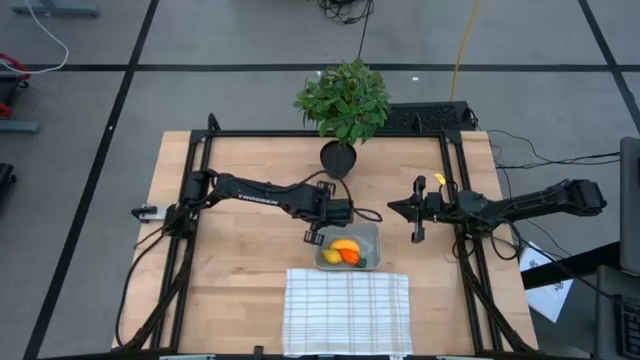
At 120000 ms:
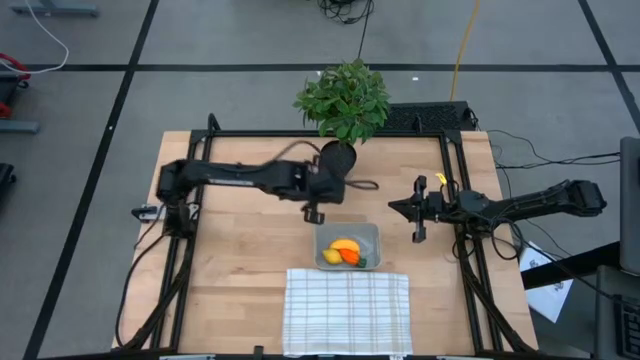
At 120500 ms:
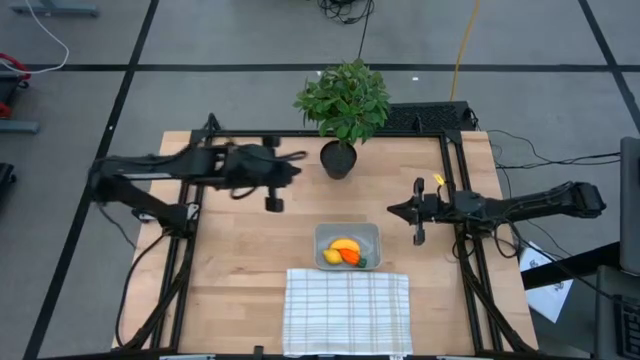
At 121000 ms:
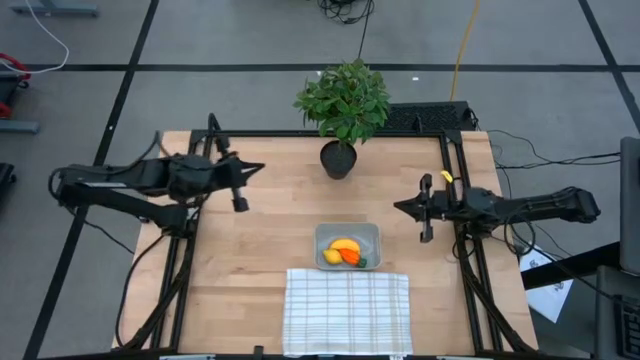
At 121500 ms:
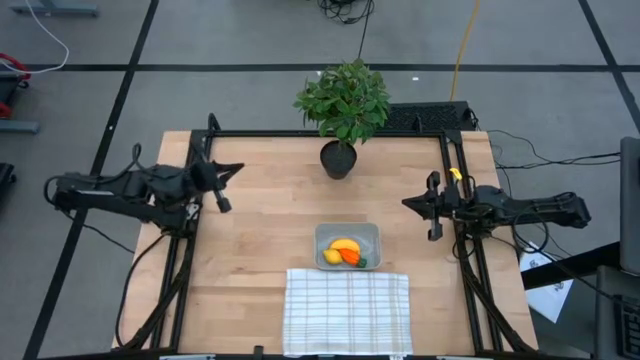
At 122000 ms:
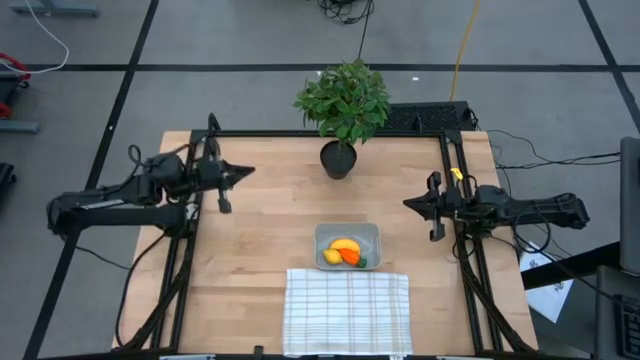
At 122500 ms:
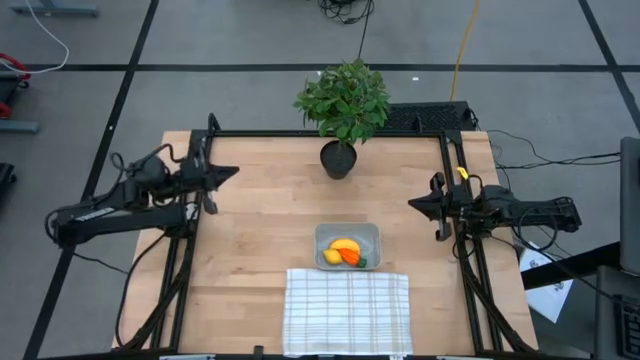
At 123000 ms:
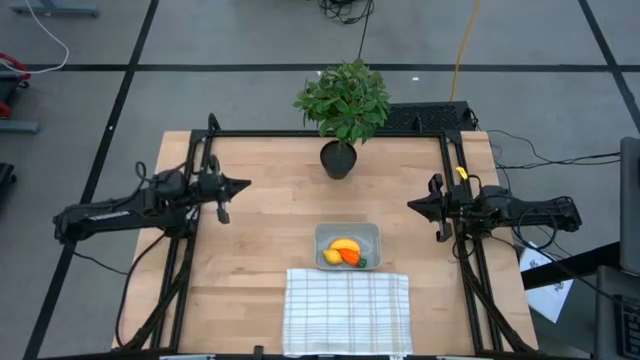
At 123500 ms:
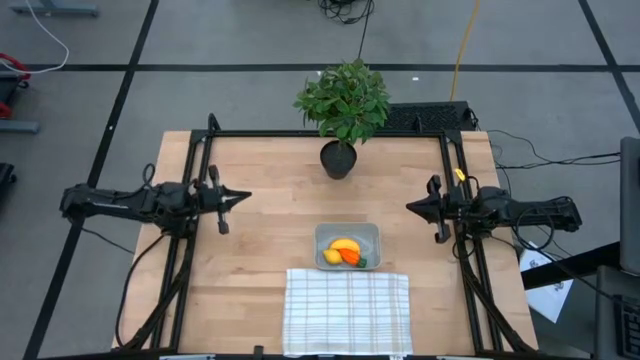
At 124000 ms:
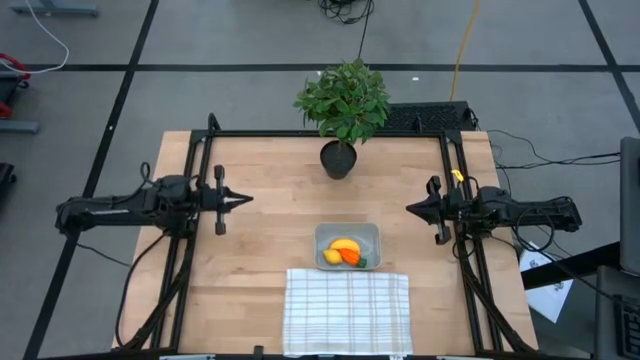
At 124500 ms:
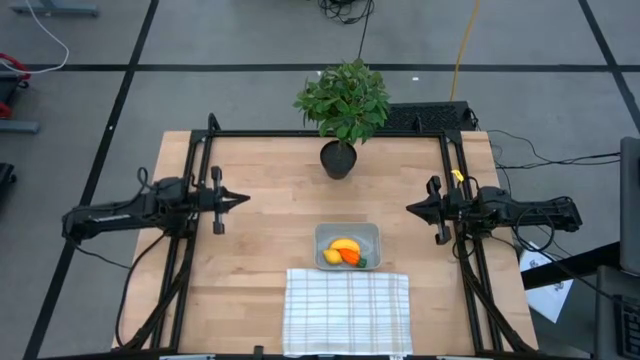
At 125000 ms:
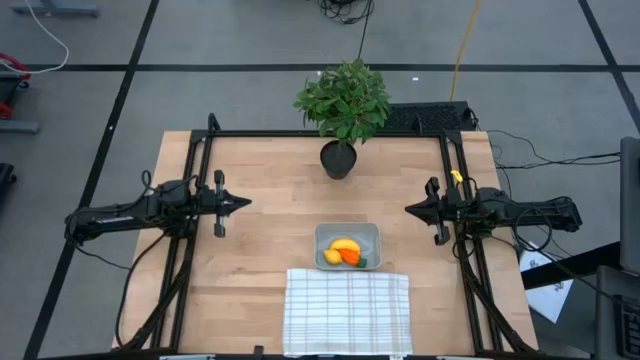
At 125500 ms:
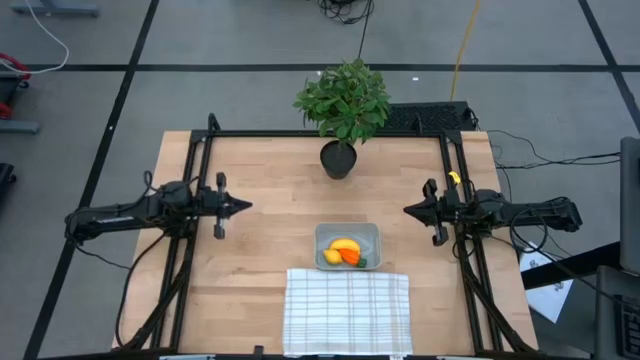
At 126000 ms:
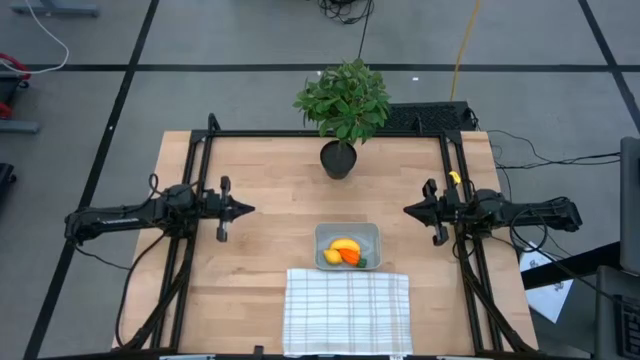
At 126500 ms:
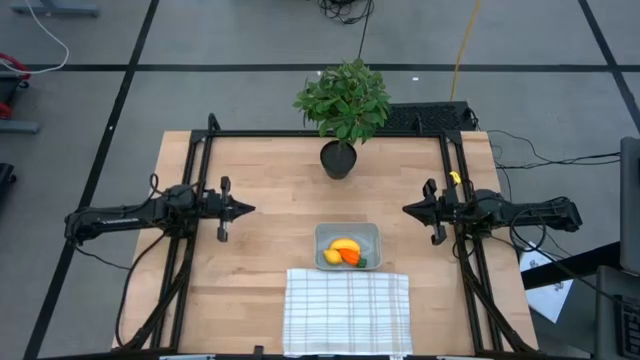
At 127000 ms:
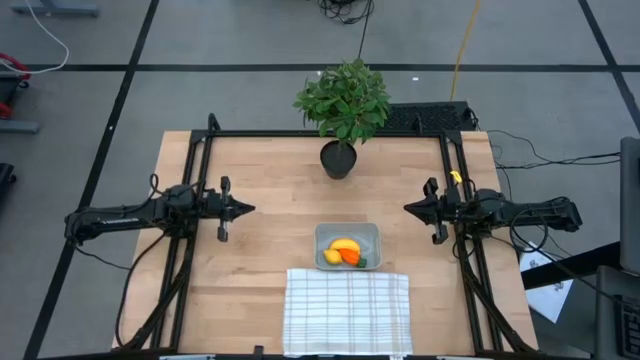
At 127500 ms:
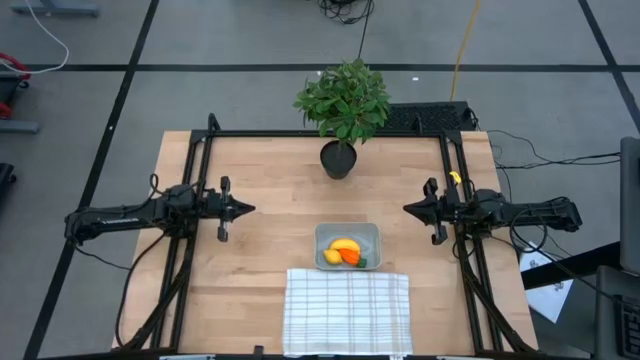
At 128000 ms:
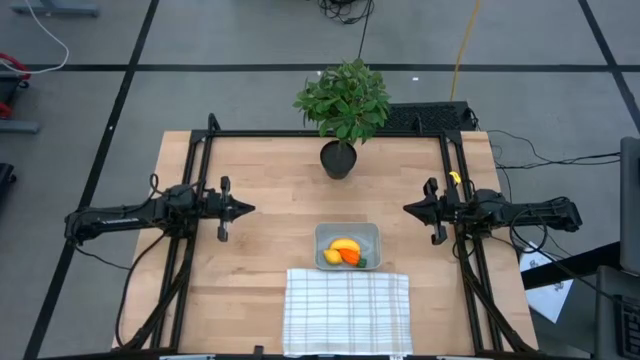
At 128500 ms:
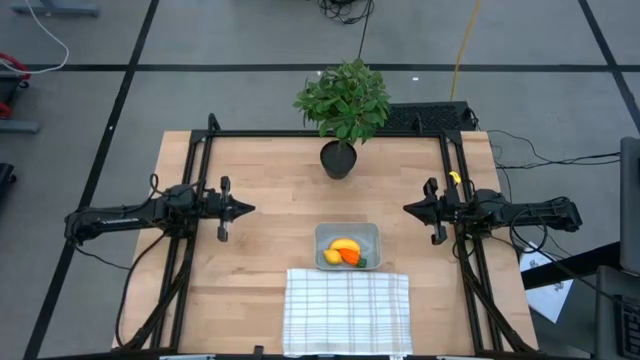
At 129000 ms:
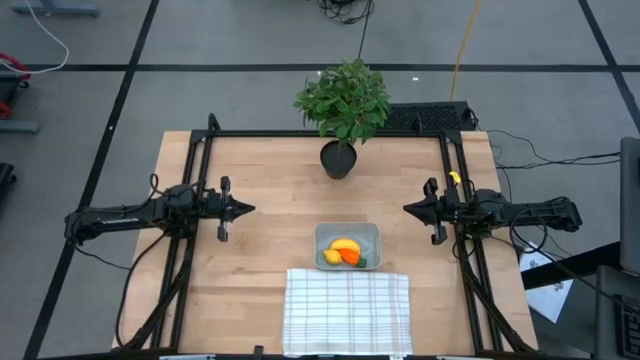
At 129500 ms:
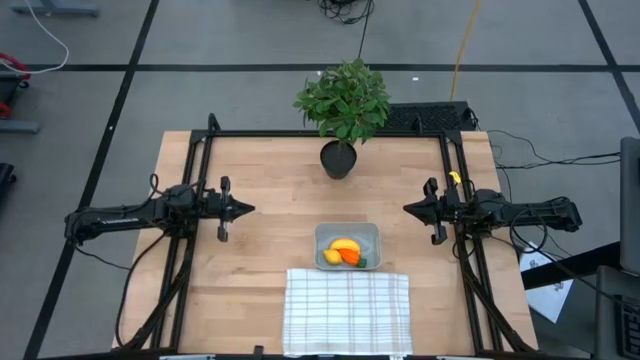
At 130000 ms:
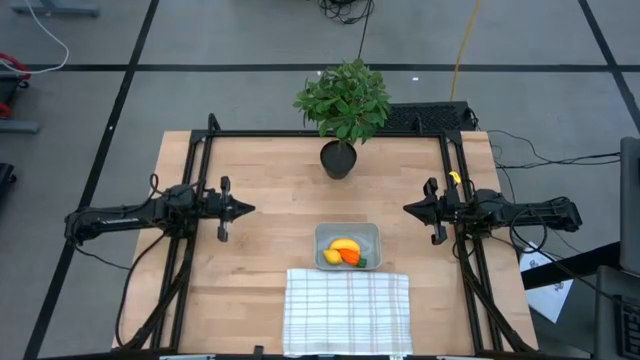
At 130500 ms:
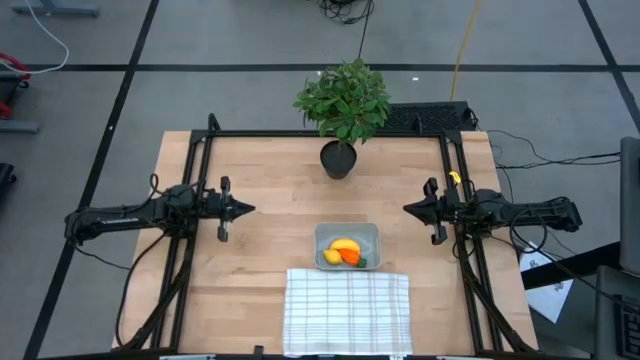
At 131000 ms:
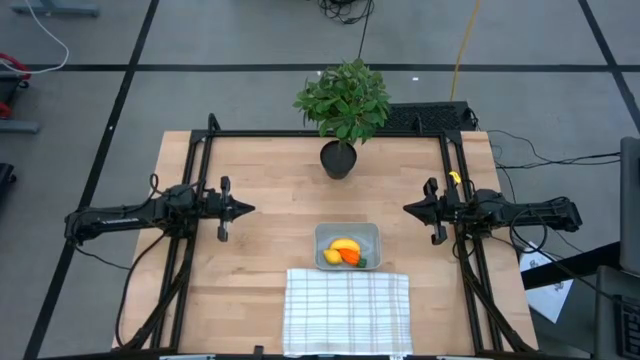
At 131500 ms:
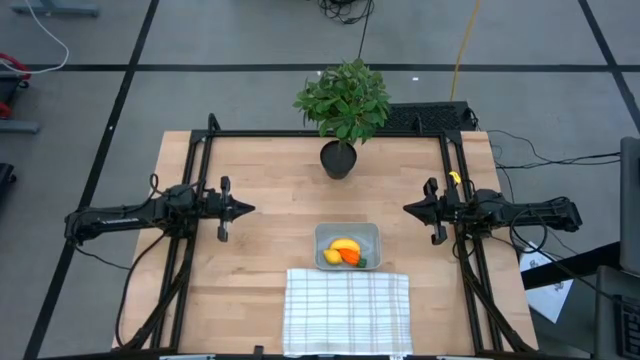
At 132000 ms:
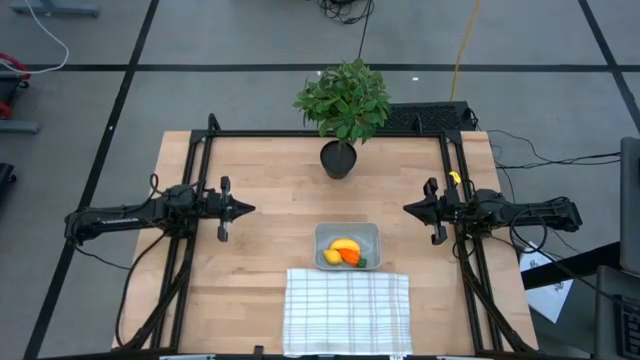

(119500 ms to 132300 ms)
Task: Pick and placing Produce into tupperware
Return to Home Position

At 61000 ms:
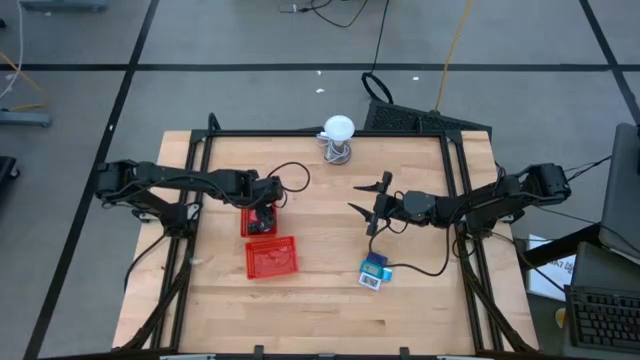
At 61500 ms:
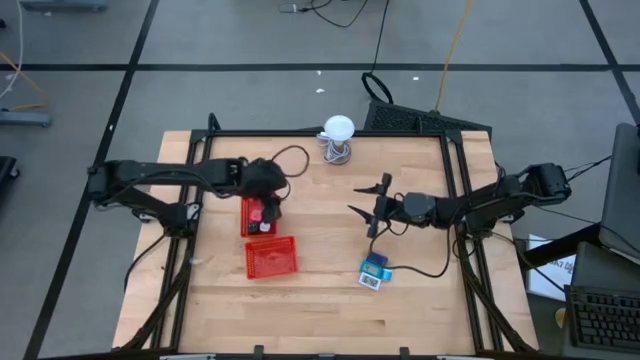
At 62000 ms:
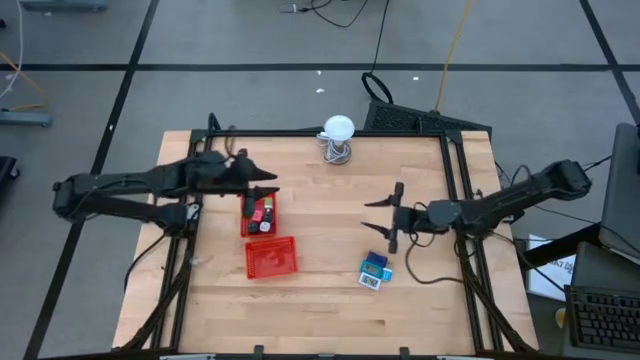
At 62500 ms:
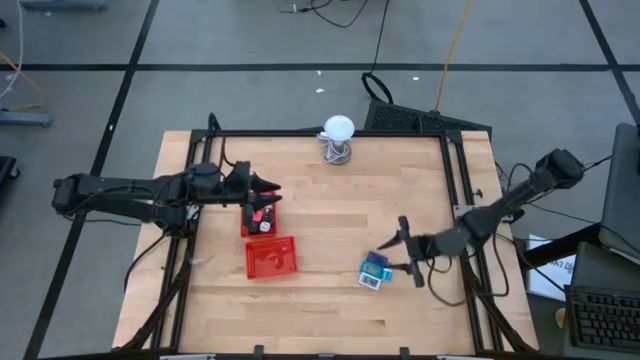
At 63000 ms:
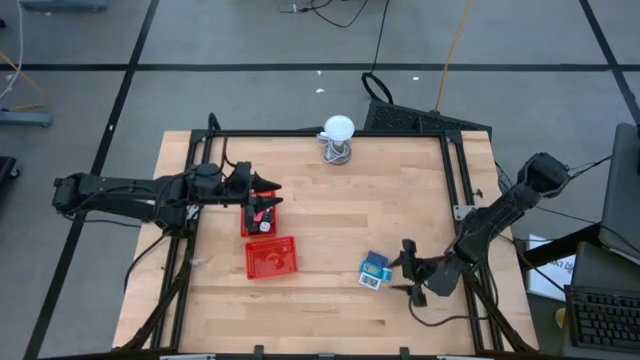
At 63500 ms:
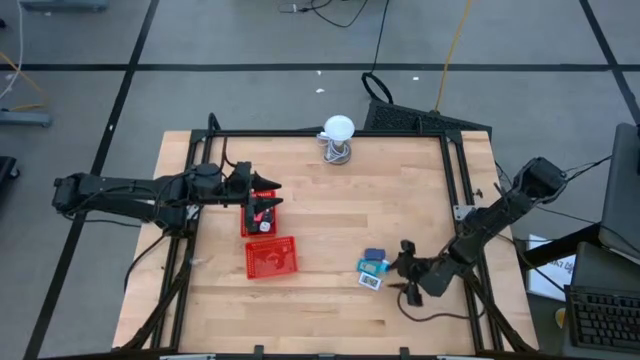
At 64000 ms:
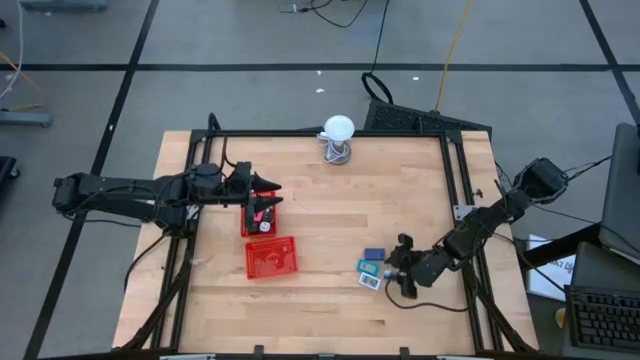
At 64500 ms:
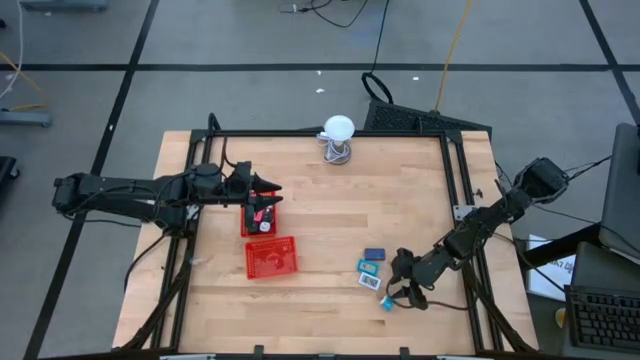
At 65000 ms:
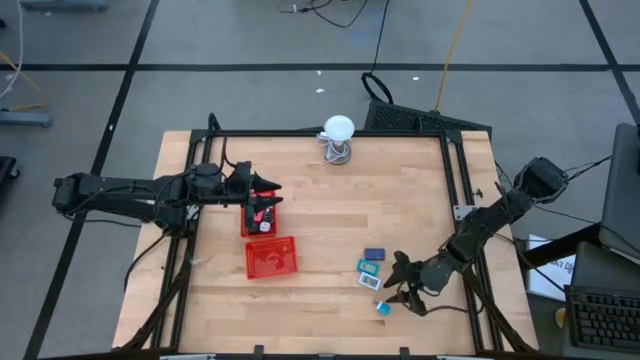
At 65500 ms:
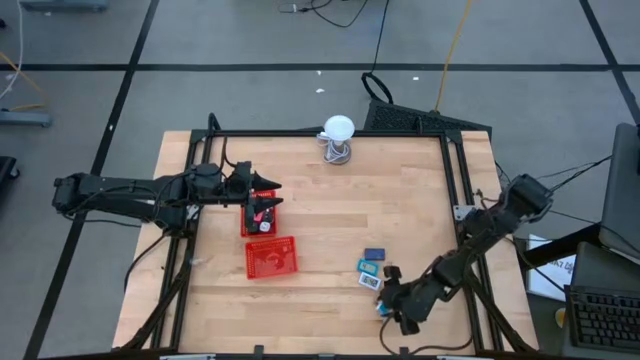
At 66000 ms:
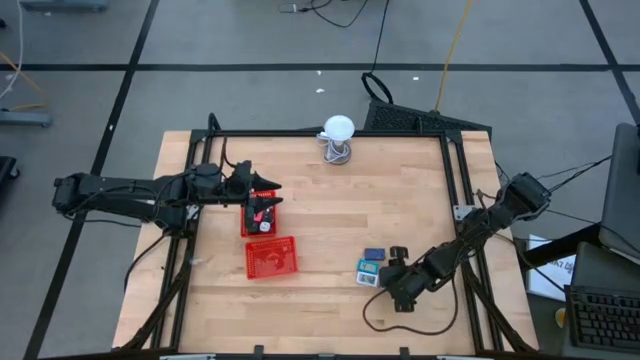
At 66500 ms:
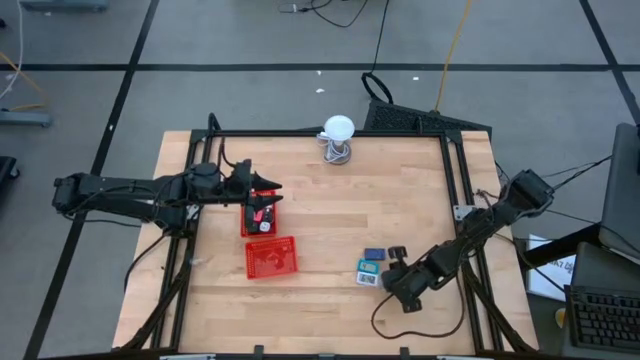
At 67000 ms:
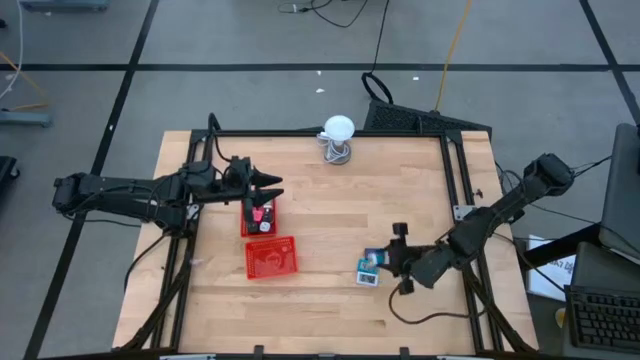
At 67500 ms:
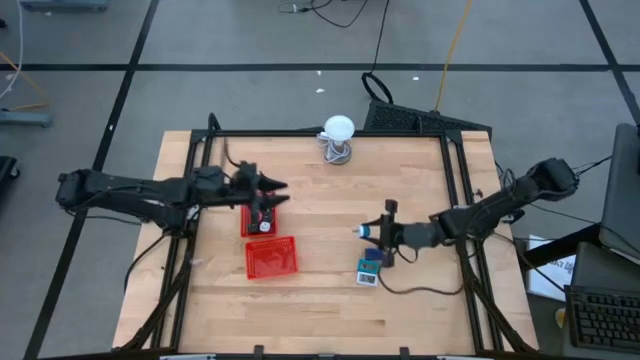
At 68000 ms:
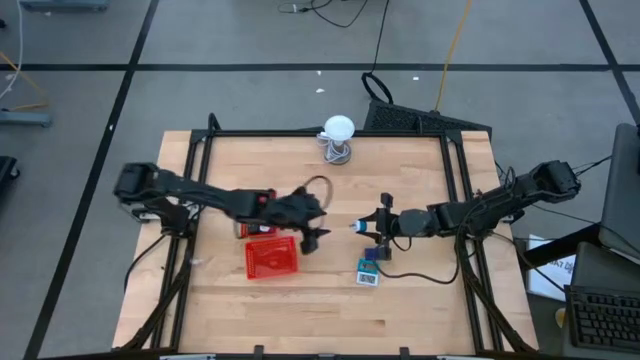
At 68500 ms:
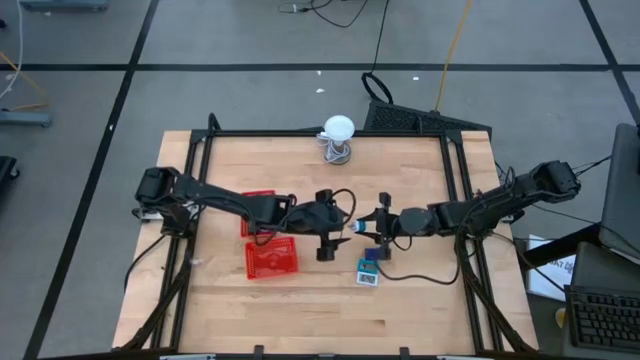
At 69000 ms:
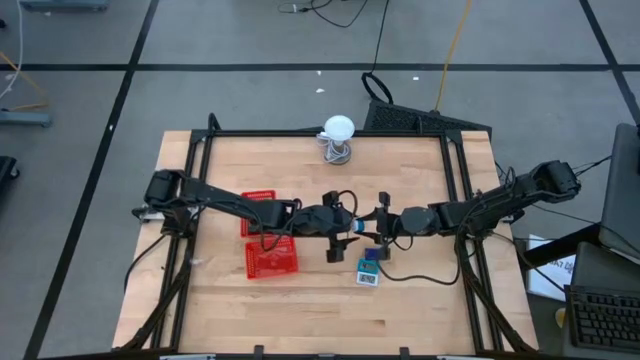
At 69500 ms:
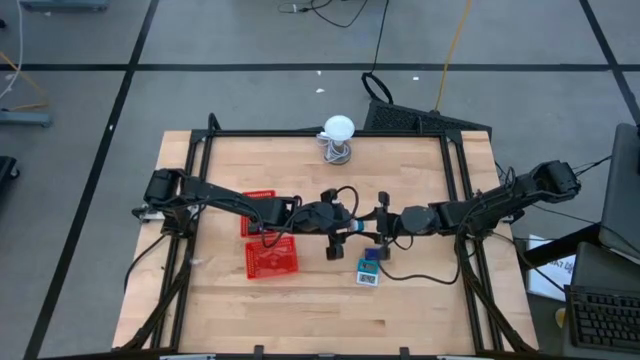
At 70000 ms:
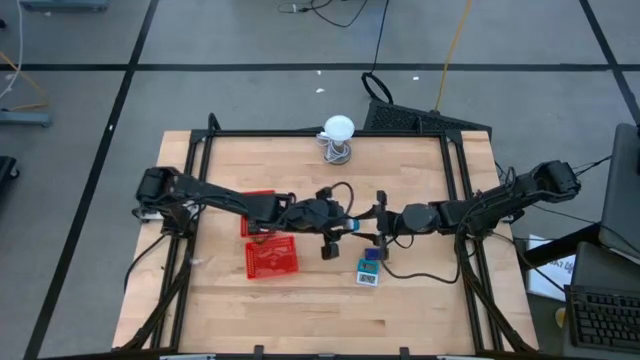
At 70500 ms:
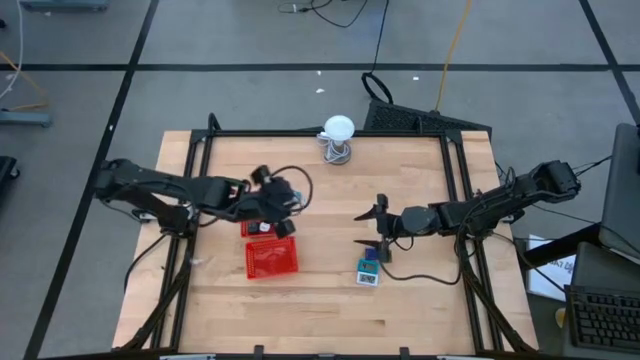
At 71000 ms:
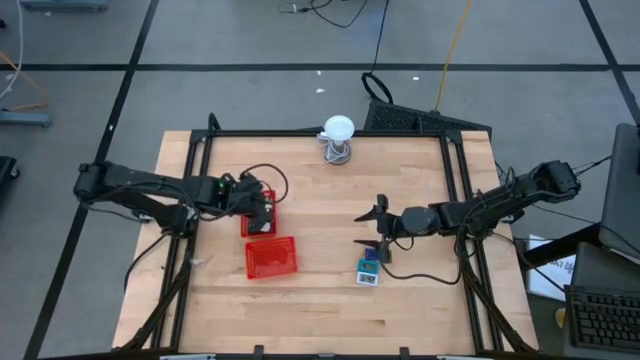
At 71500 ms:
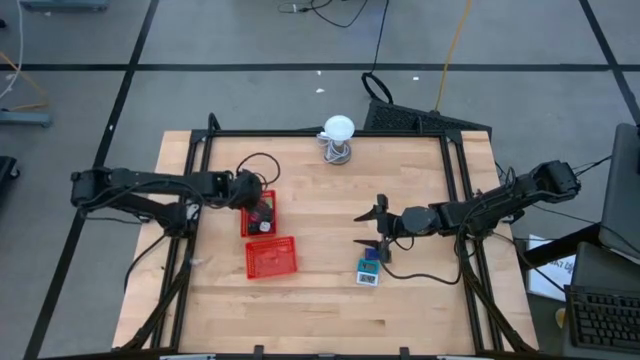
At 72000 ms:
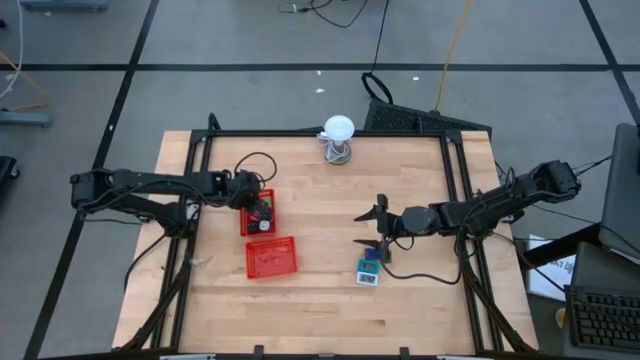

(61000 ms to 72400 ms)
Task: Pick & Place Office items
Put the blue charger adapter into the top red basket
